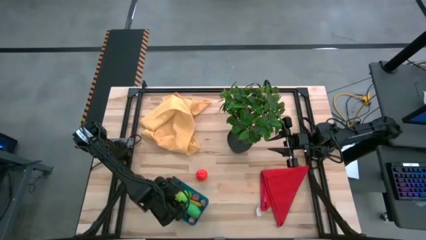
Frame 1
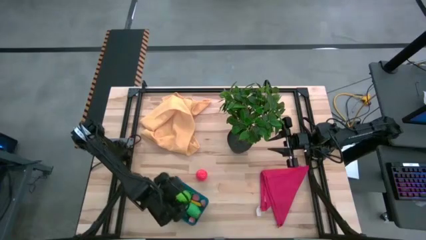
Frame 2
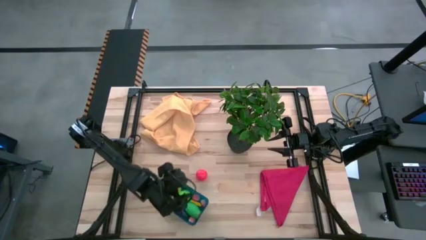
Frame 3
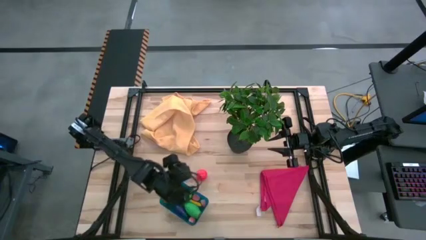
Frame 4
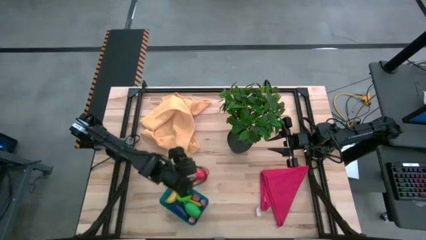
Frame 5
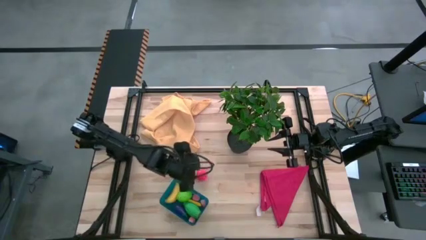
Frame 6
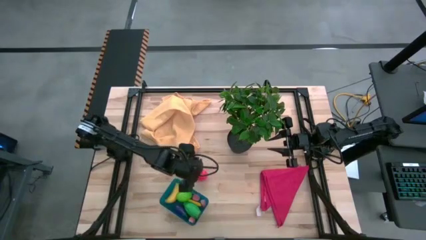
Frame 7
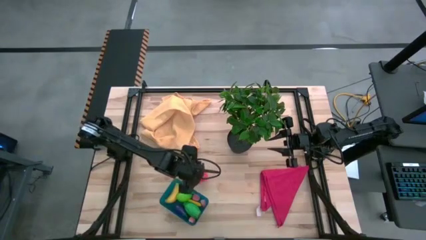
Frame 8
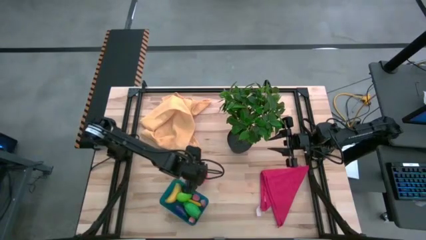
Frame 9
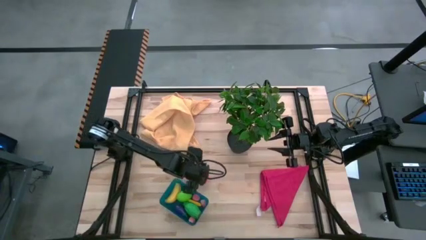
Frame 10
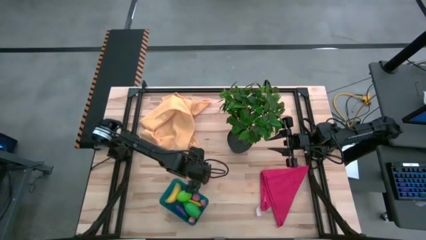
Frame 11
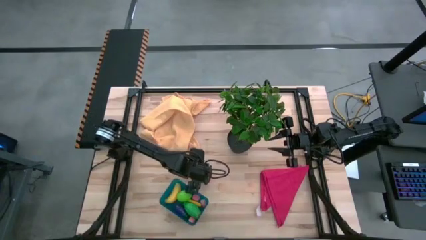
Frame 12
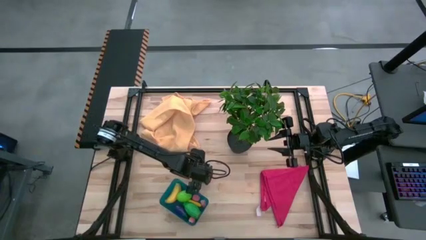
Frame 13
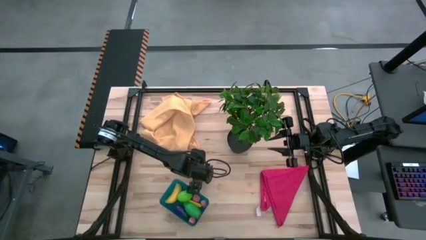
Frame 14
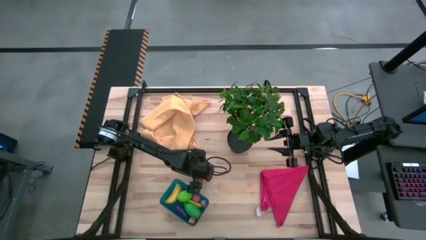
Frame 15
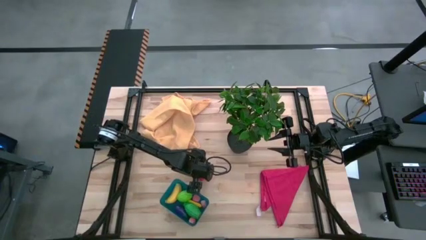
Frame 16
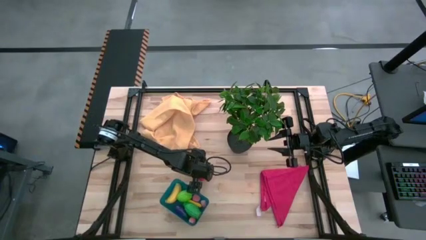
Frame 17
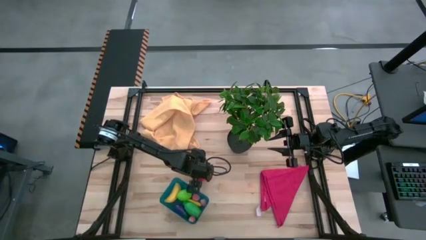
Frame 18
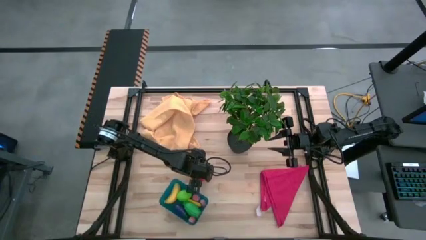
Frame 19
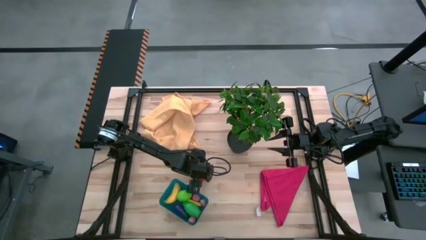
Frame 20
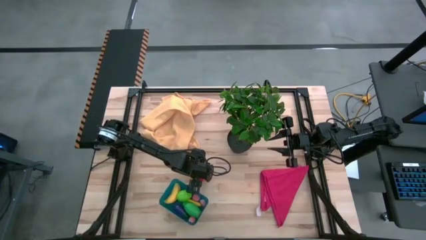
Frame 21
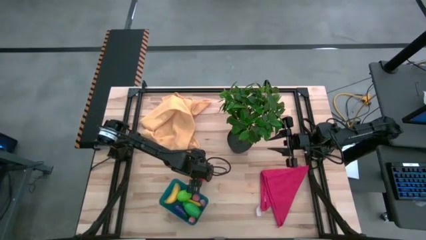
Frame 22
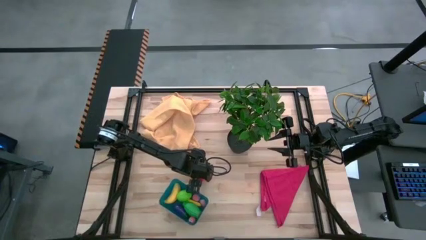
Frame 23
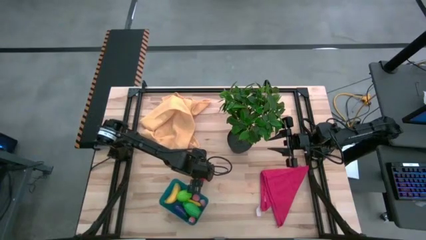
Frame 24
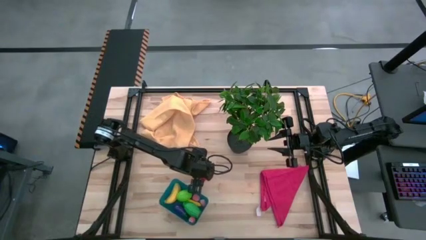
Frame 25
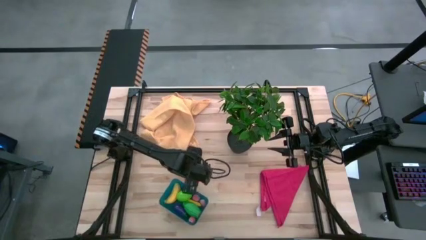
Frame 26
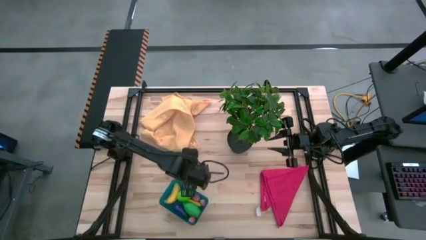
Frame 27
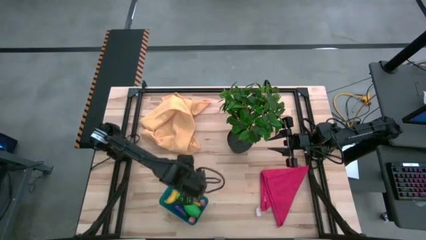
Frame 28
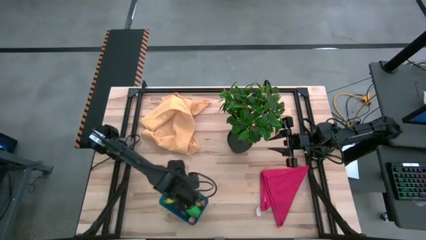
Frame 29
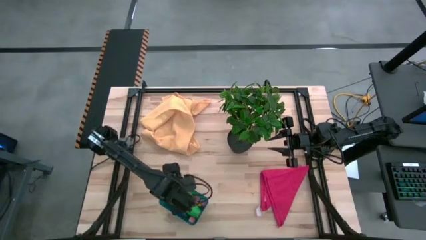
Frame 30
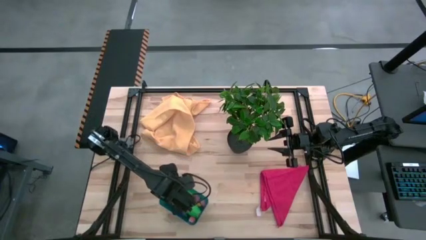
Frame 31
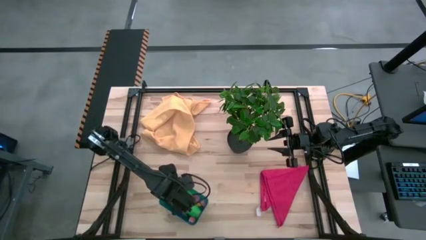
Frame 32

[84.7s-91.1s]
Task: Pick and placing Produce into tupperware
Put the red tomato into the blue bin

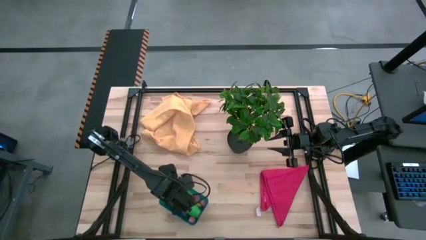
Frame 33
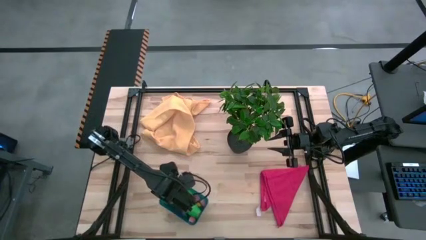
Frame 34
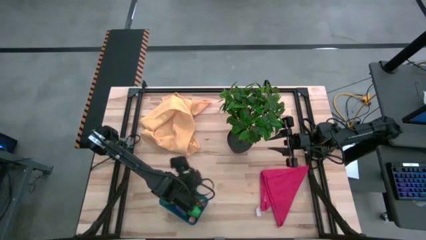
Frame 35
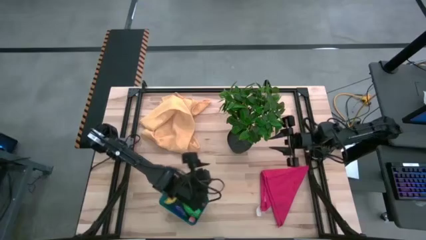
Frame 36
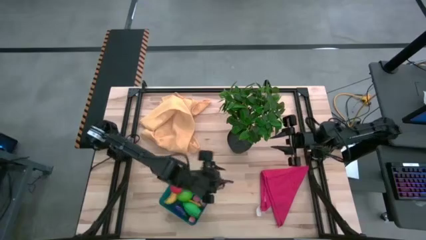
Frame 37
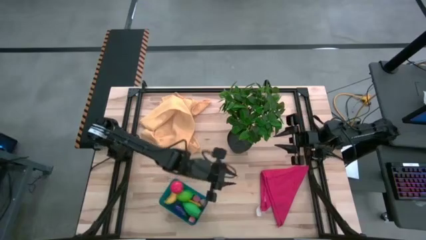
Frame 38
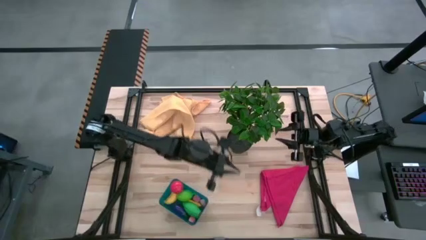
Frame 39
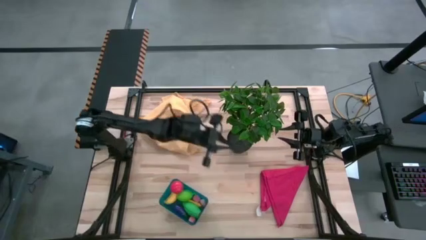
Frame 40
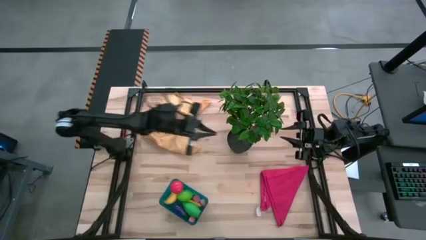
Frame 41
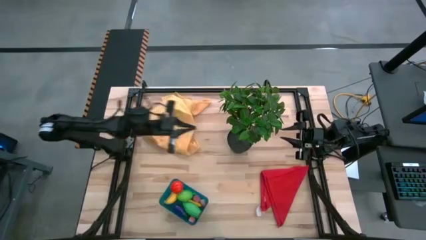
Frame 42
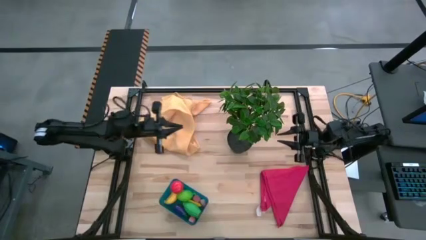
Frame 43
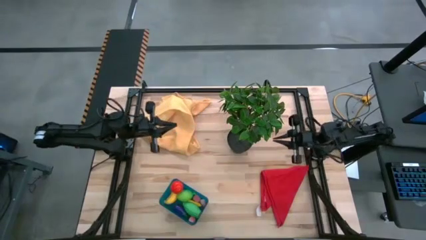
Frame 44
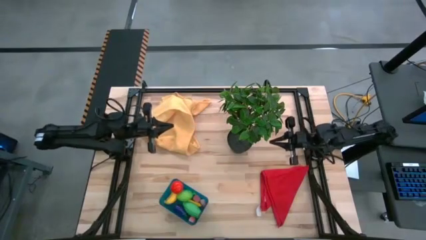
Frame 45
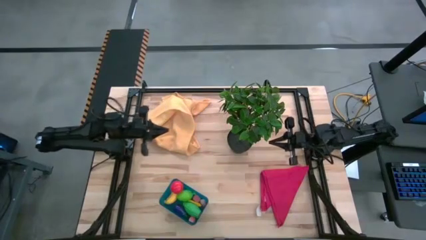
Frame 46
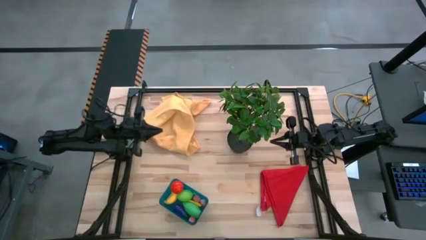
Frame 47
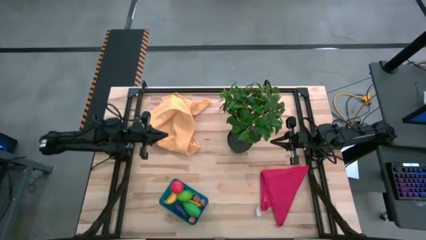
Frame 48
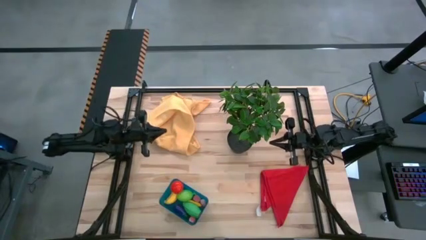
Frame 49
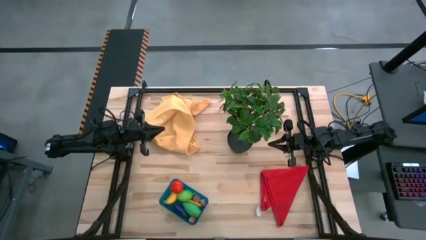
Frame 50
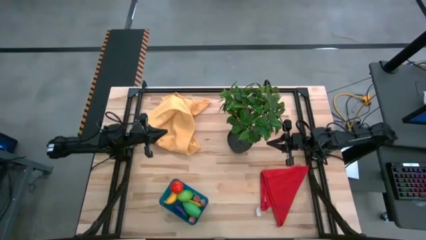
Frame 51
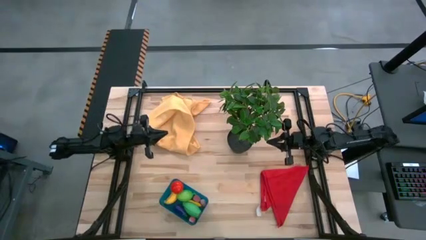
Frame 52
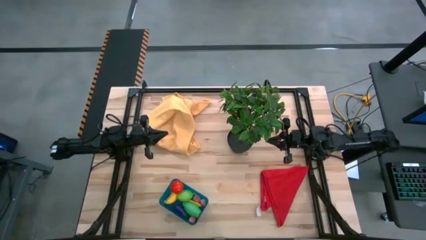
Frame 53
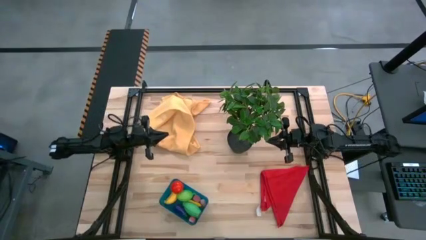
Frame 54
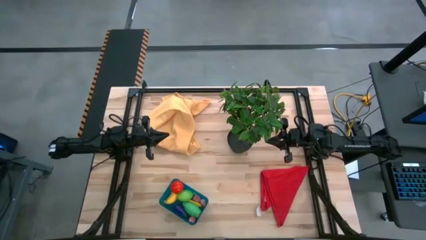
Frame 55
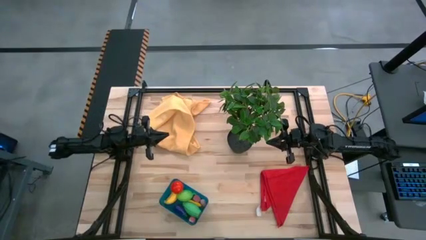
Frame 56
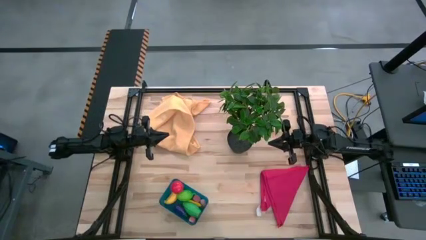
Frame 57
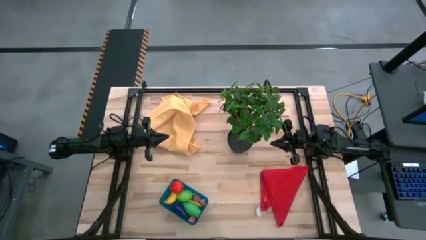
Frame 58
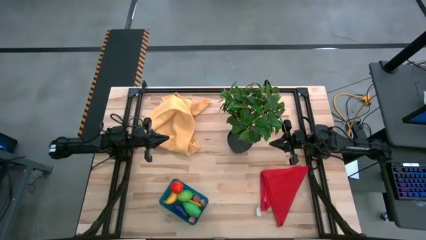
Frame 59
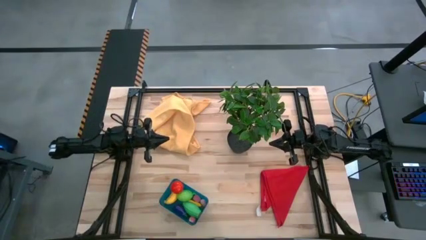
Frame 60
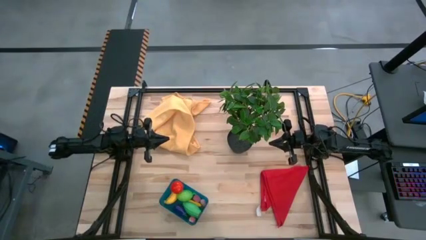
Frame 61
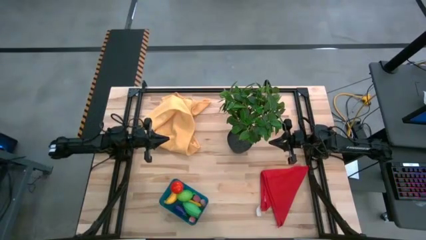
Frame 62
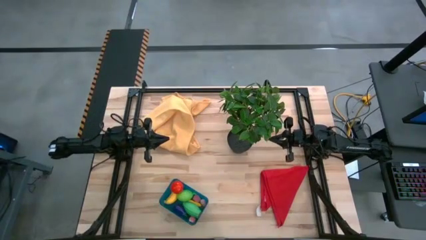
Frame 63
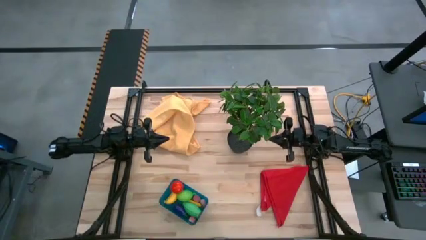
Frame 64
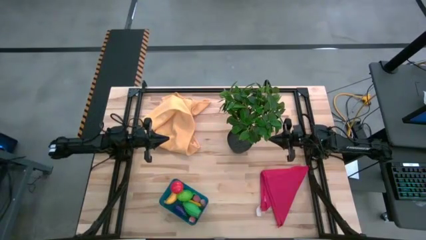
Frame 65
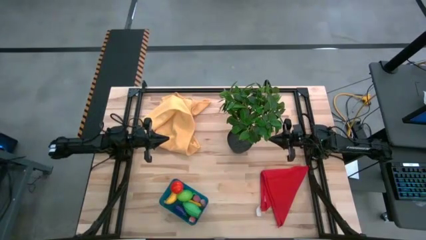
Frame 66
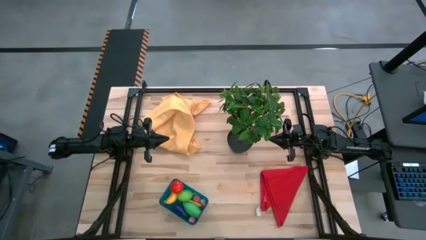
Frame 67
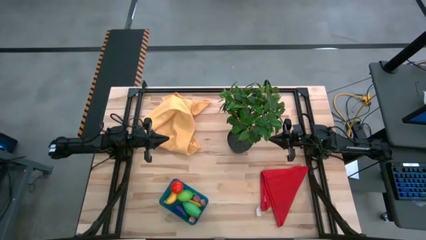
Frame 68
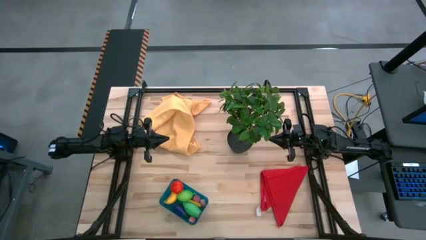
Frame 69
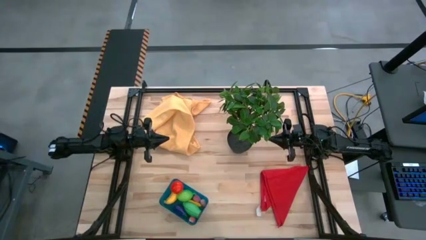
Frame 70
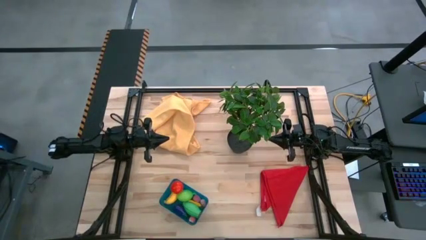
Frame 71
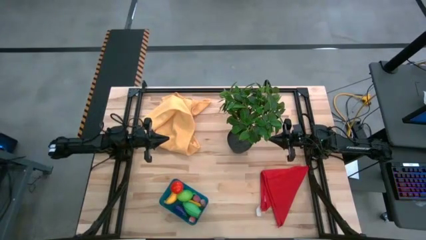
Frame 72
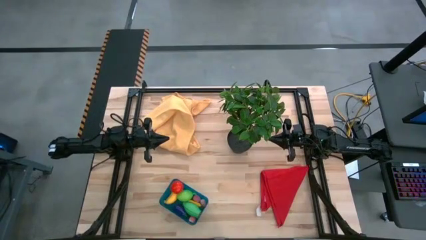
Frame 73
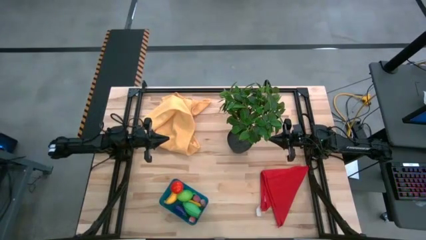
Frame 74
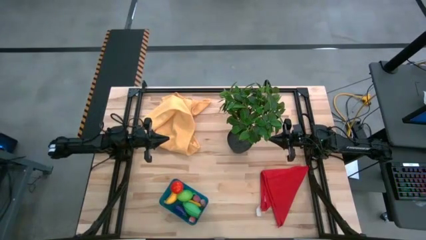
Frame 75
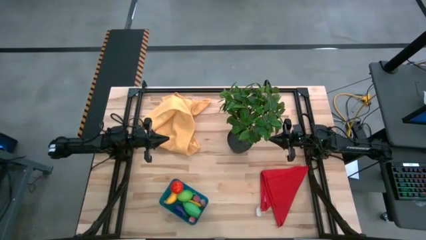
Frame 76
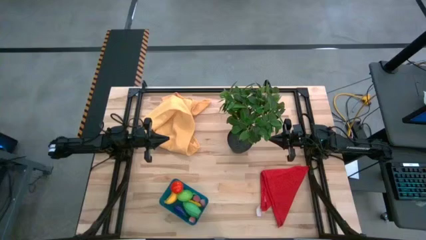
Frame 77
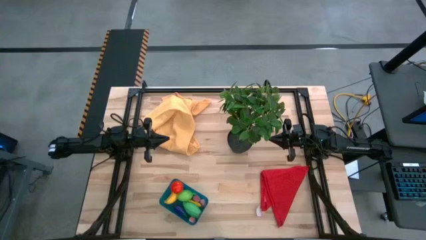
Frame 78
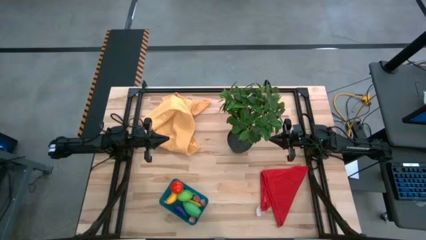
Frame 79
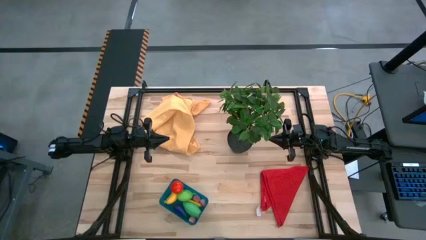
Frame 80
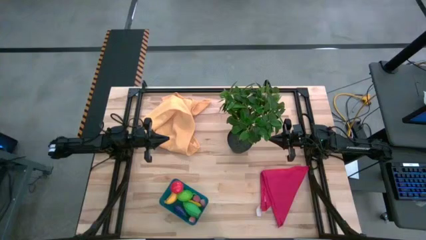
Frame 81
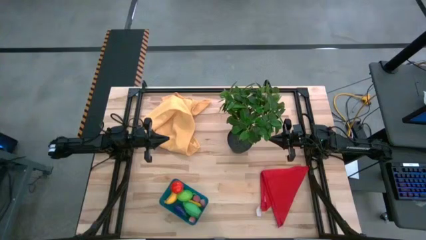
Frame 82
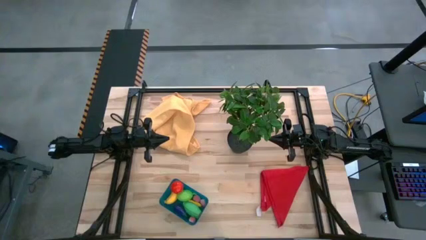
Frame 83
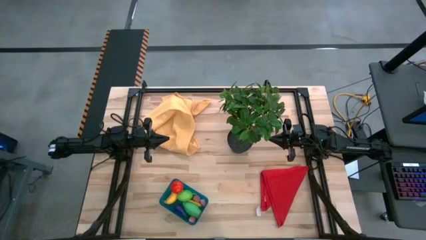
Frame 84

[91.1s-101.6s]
Return to Home Position

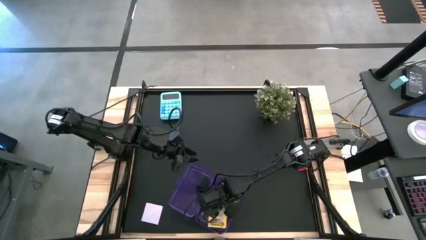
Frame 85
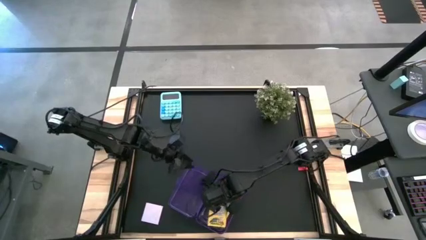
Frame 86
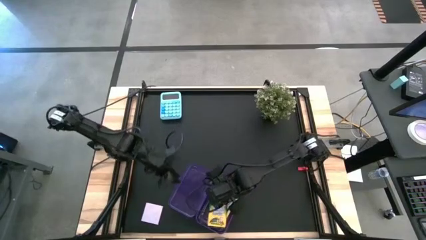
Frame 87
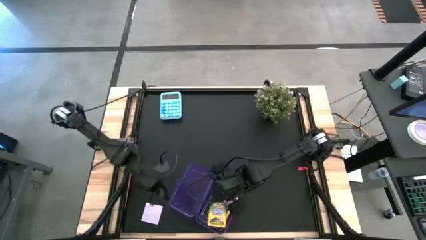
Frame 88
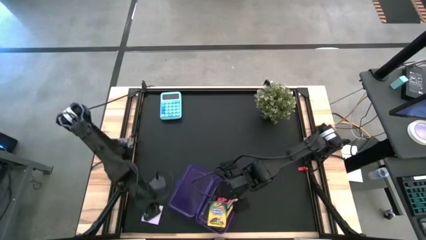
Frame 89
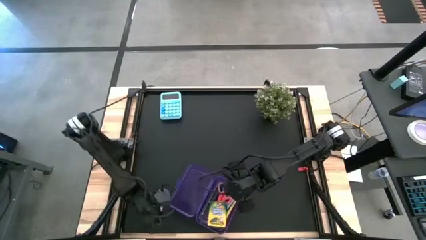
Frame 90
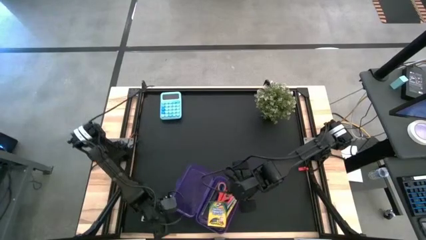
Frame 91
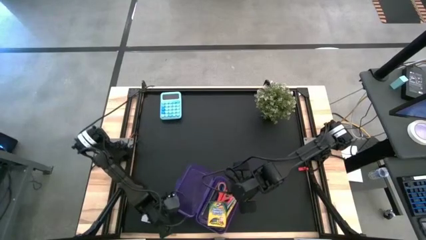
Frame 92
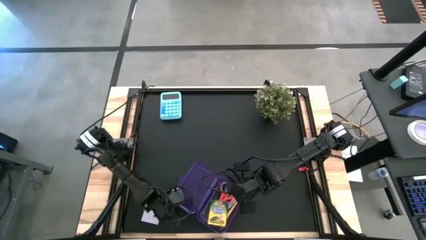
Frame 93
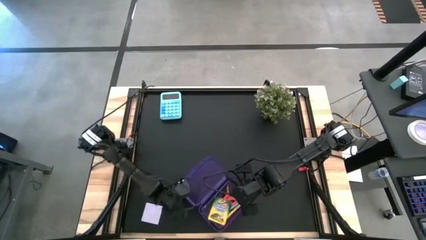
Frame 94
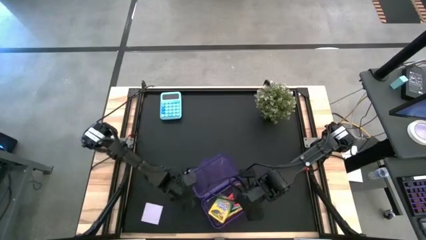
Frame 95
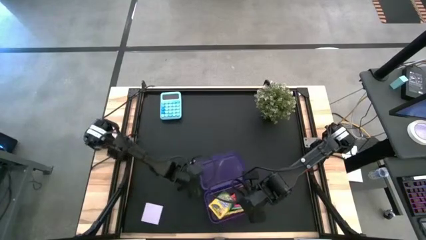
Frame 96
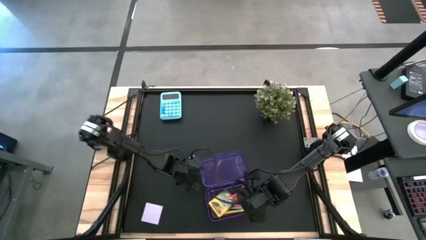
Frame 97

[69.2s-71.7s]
Task: Pack school essentials
Adjust the purple supply box
